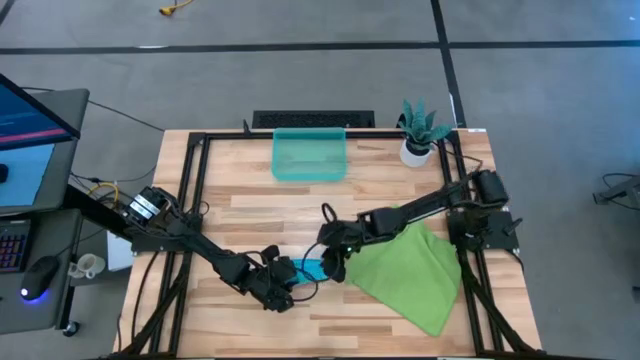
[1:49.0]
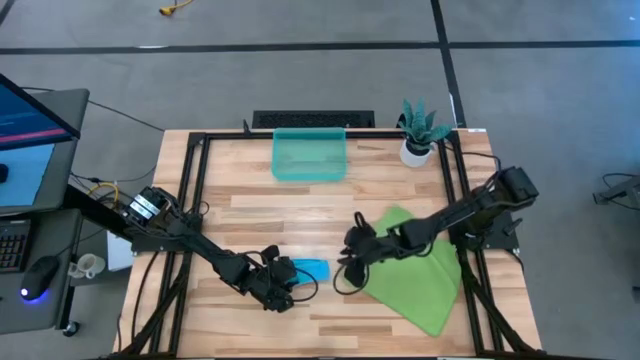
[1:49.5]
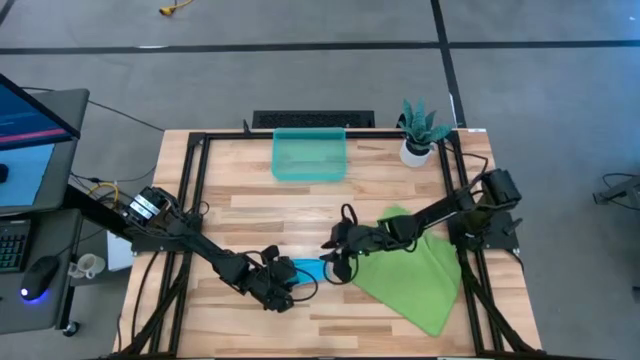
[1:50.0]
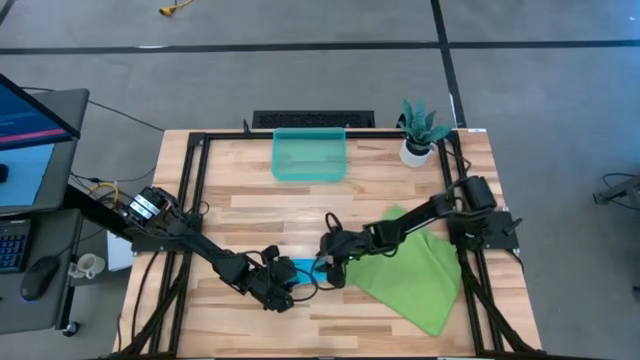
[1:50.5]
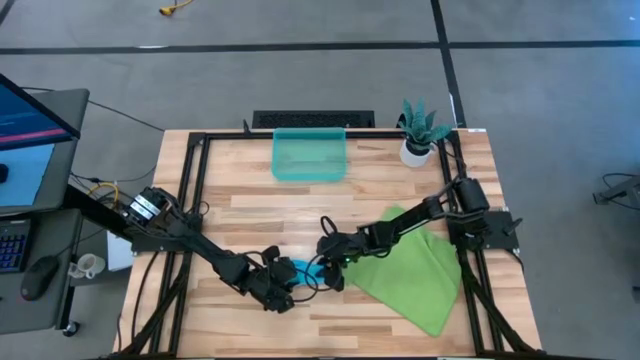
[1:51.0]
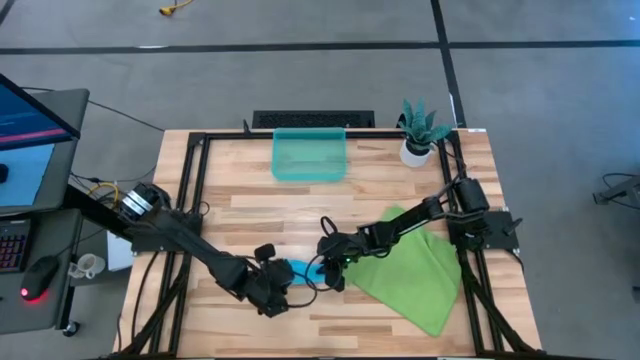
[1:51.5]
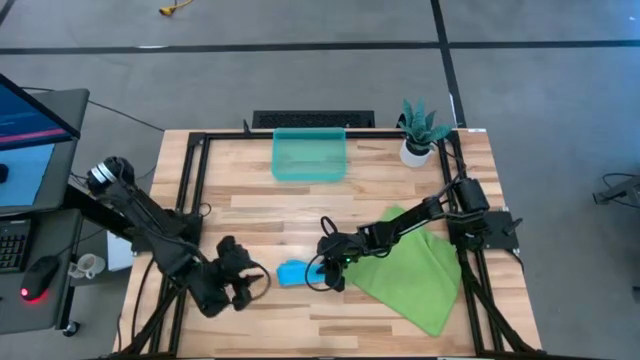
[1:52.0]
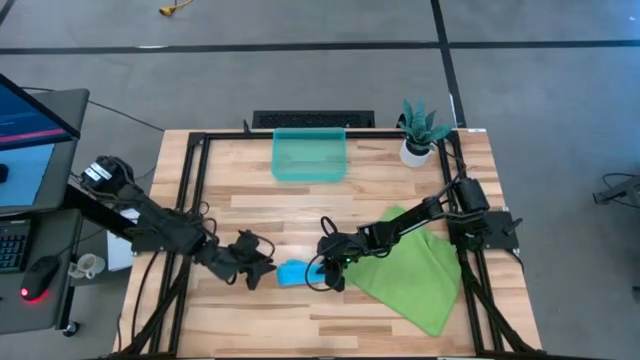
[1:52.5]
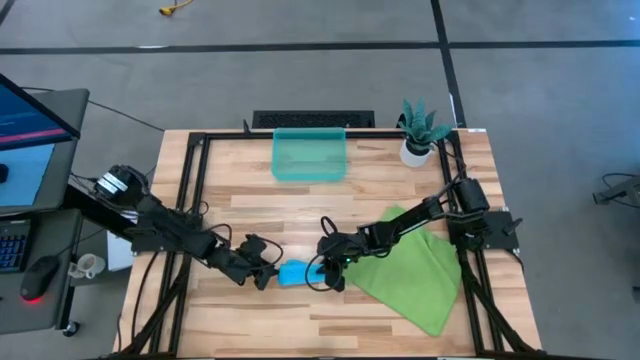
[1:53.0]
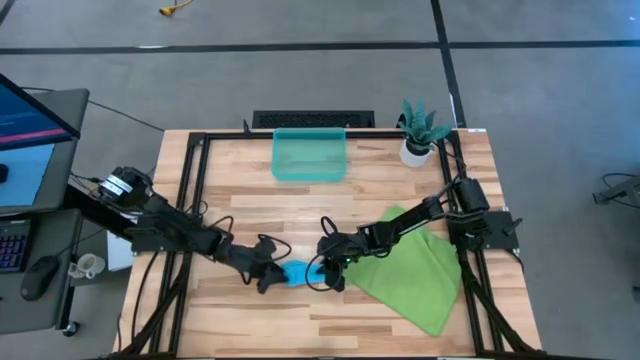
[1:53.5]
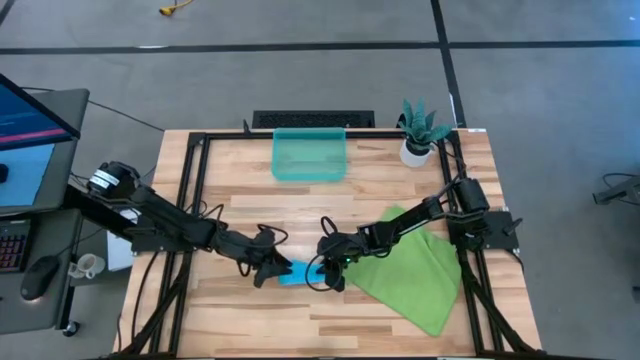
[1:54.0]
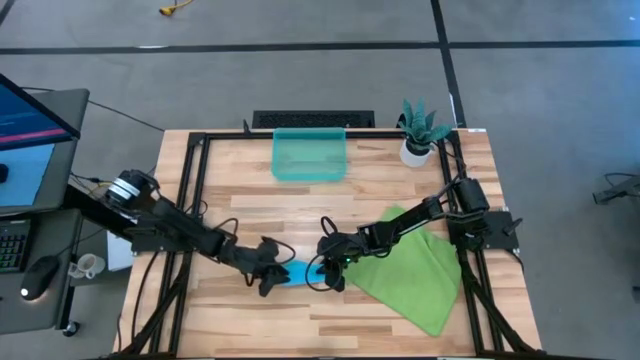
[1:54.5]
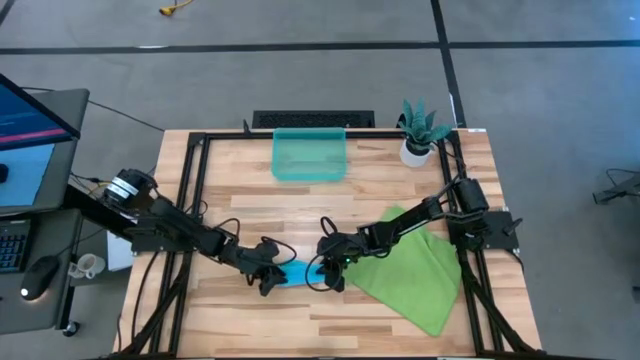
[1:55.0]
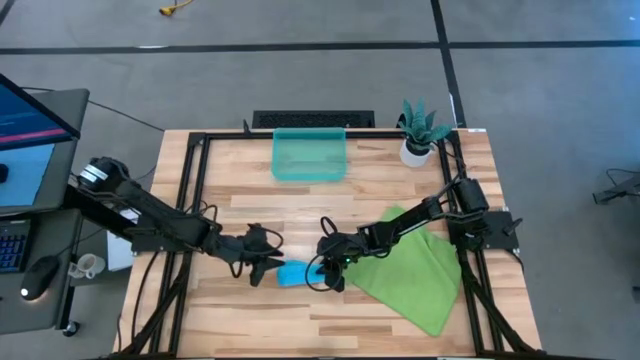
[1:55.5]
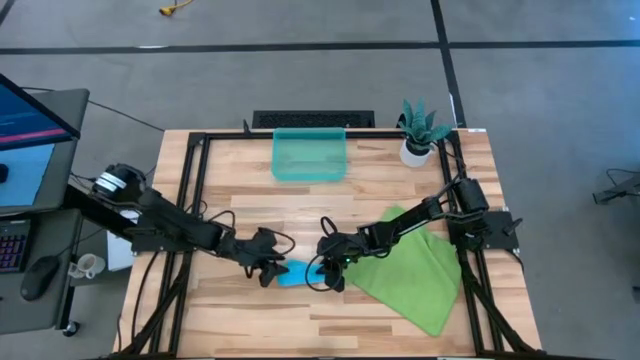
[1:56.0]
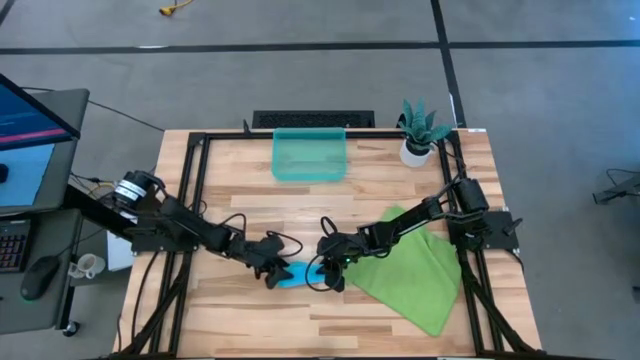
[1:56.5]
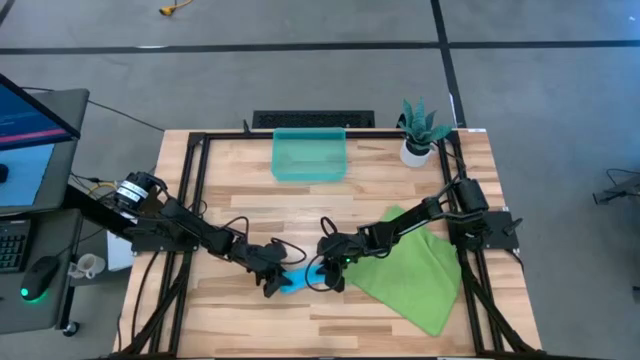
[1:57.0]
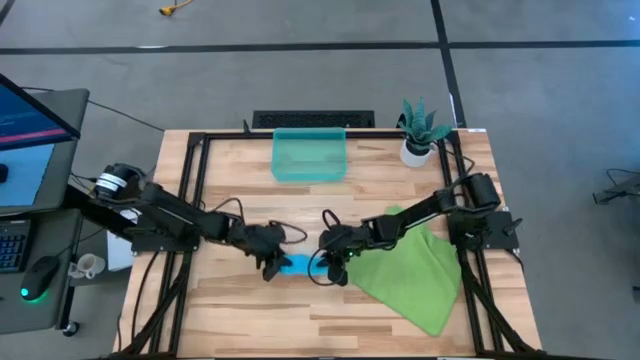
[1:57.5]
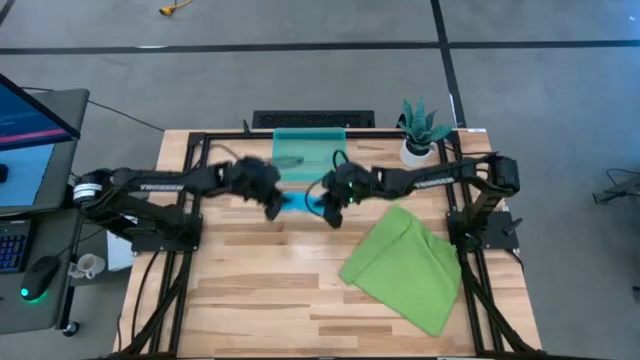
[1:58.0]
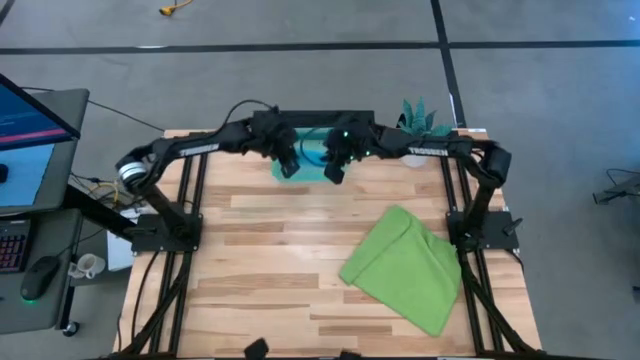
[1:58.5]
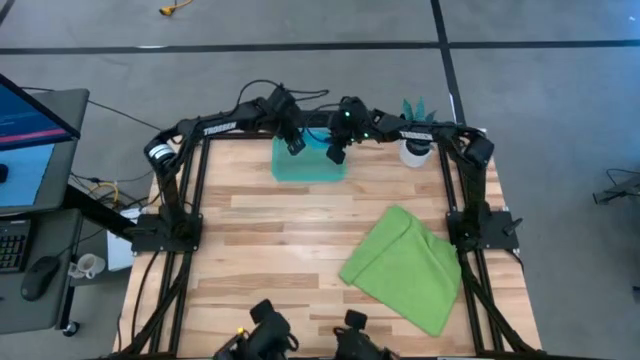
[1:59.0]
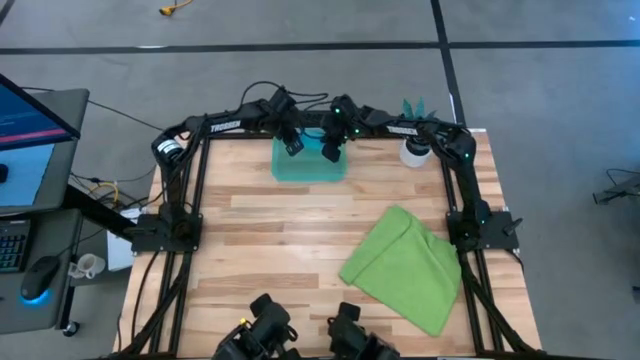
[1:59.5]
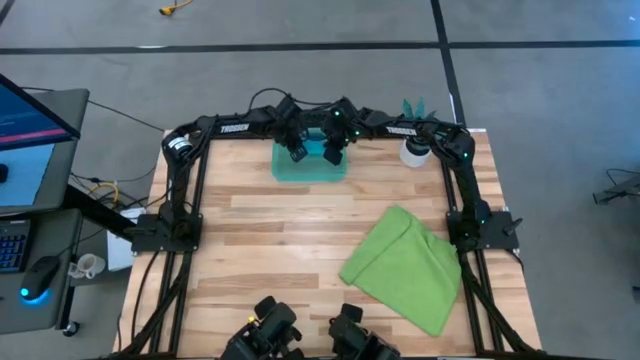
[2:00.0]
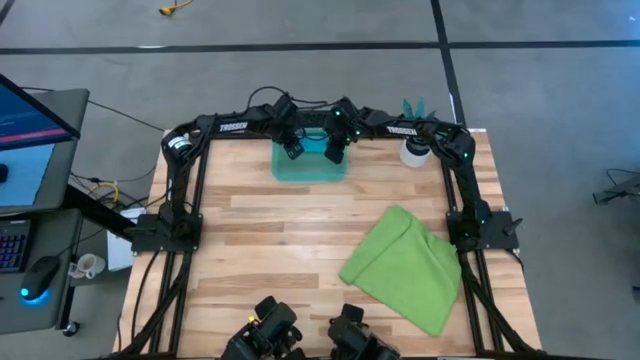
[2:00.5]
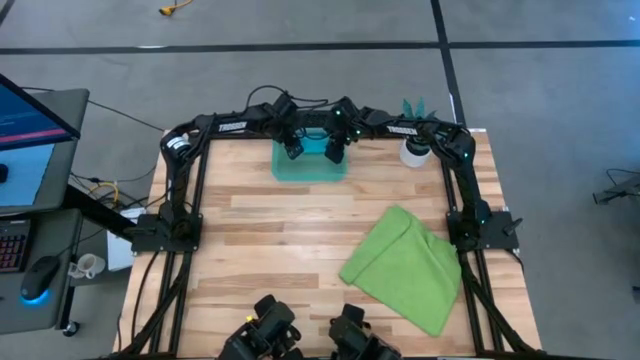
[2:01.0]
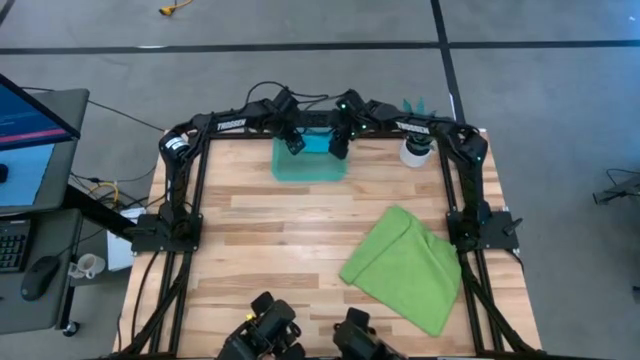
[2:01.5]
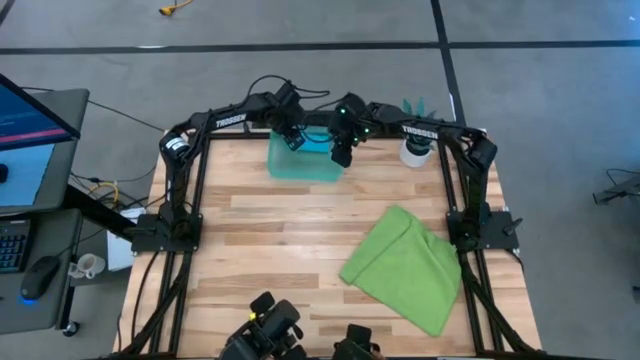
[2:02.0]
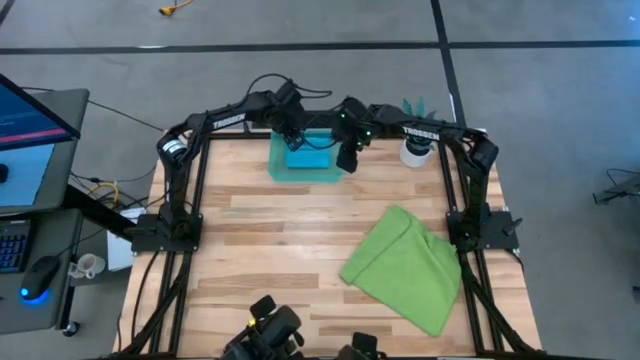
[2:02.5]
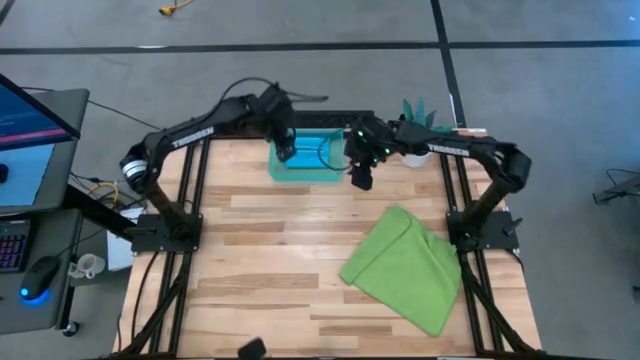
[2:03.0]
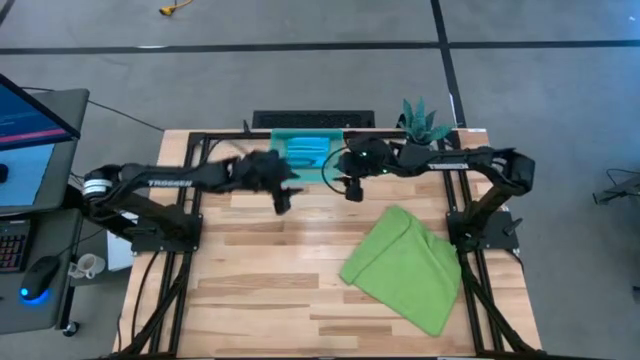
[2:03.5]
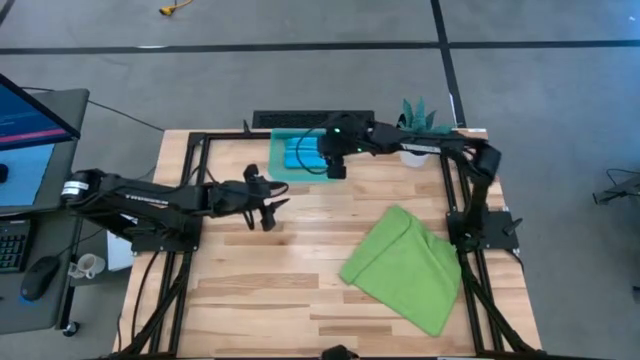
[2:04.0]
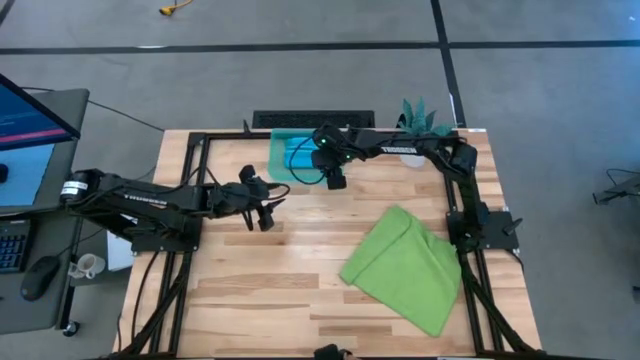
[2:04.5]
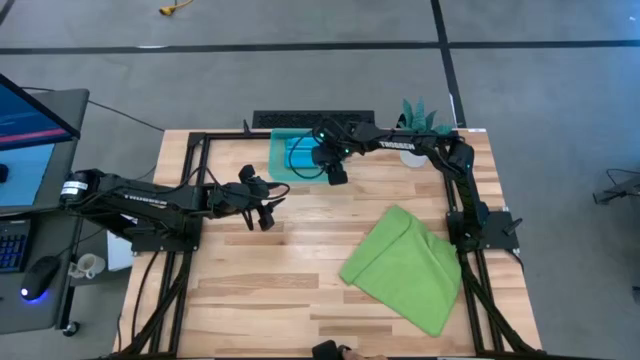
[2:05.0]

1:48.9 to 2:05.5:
Task: Roll microfiber towels into tight, uniform cylinder then place into a basket
Put the microfiber cloth into the blue bin

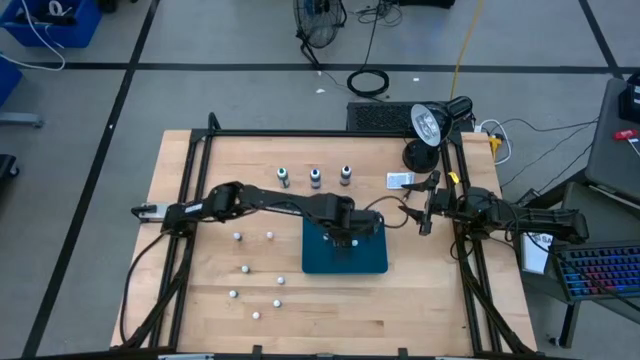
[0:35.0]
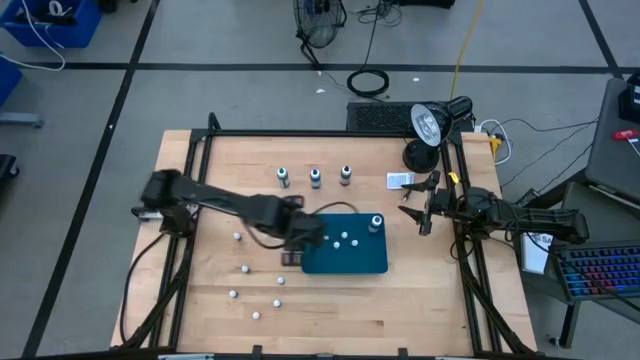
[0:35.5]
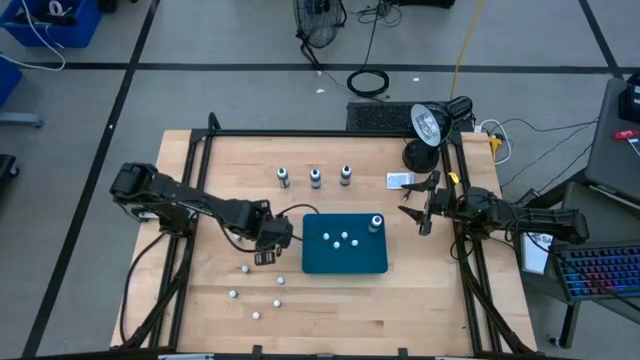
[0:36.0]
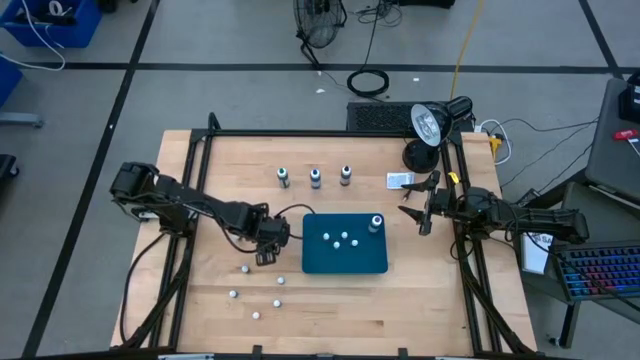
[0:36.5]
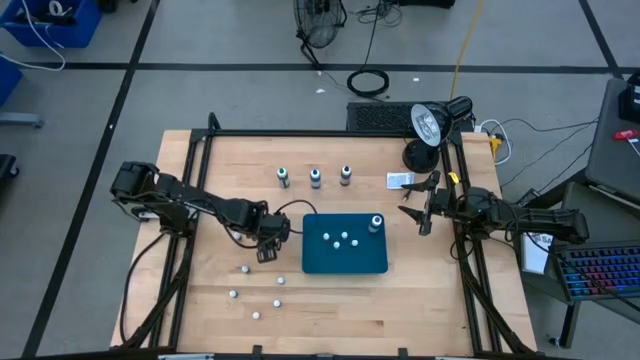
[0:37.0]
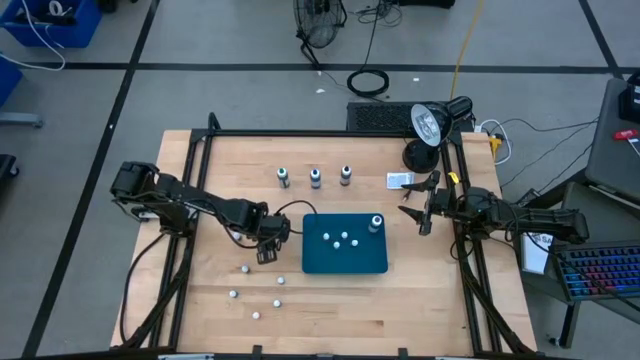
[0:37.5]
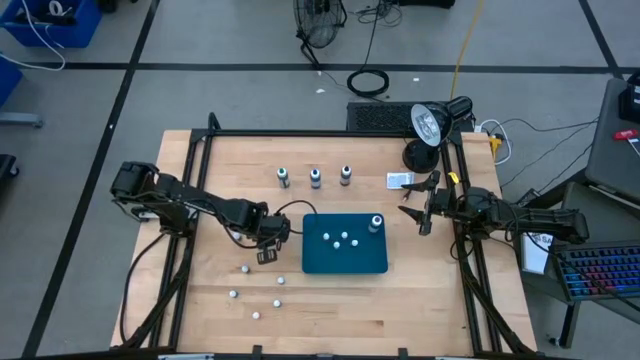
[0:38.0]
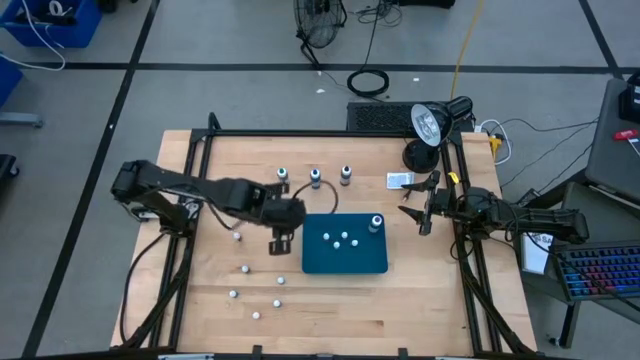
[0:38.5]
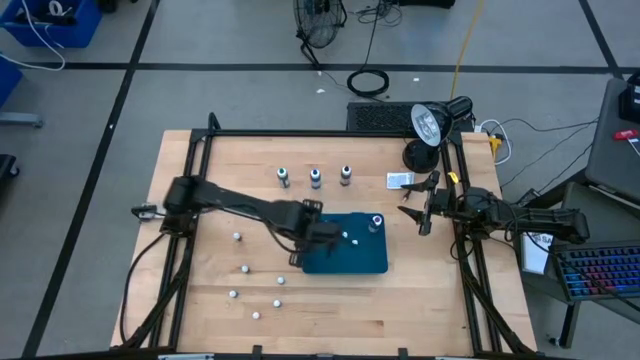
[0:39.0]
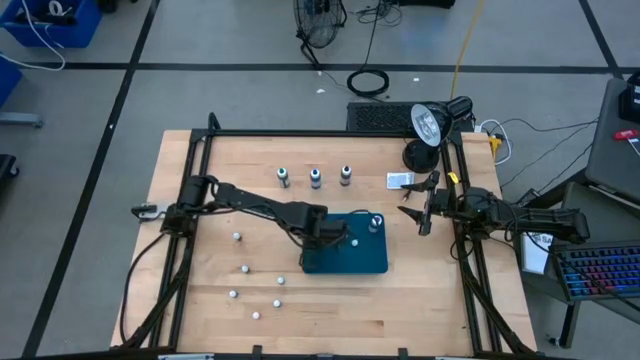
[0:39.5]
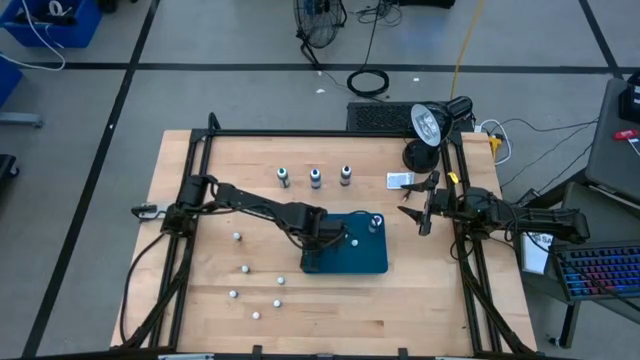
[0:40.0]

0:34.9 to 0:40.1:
Task: Pick & Place food coloring
Put the top small orange food coloring bottle into the blue bin
